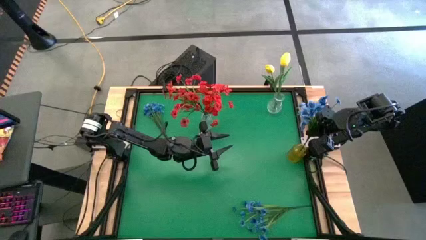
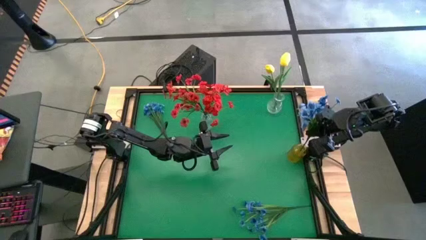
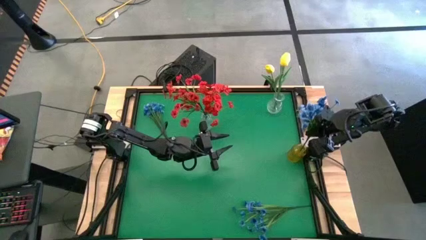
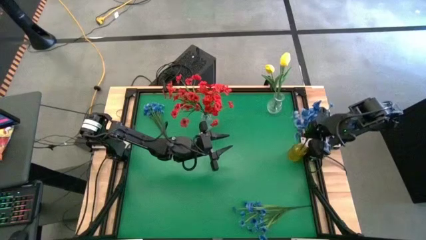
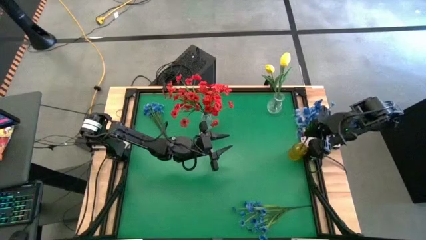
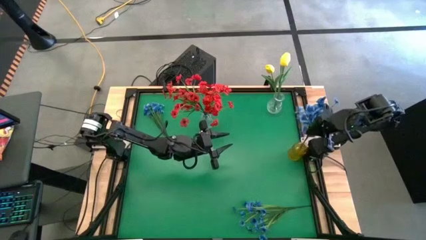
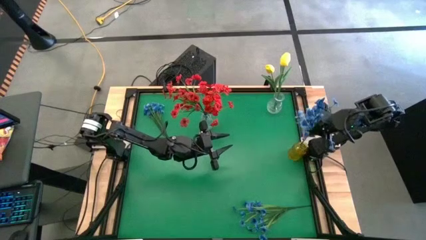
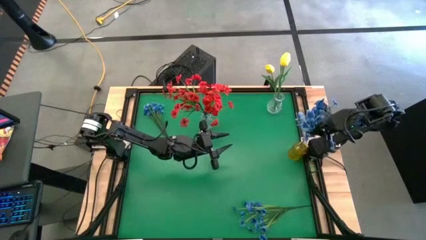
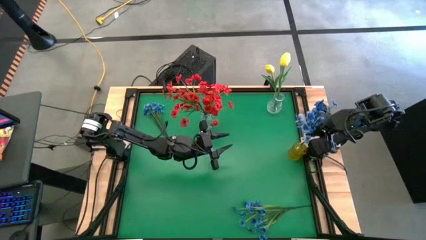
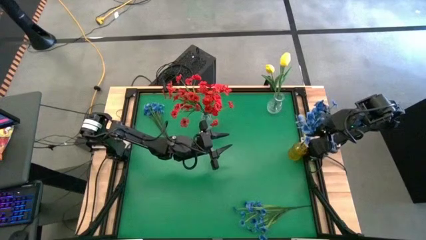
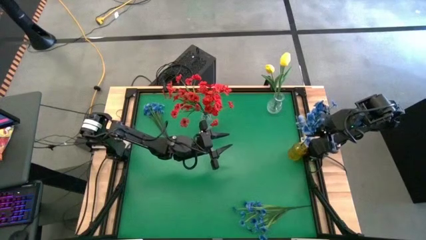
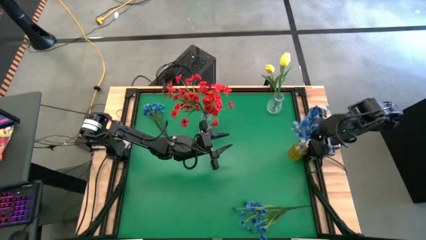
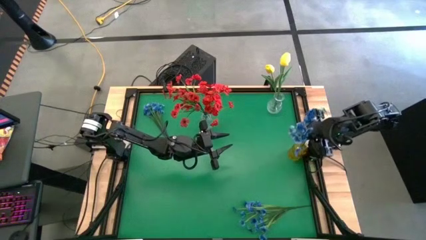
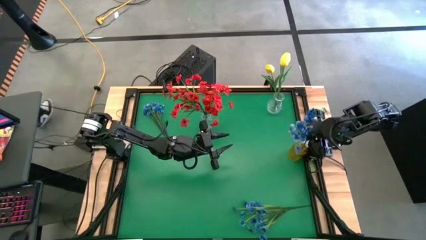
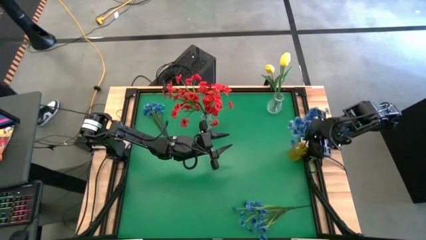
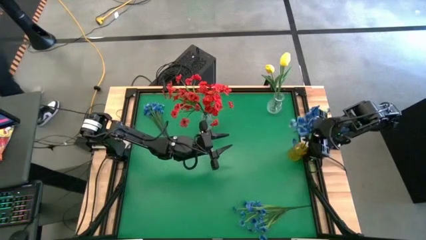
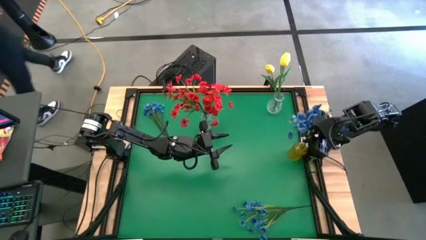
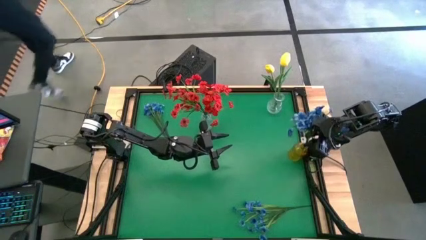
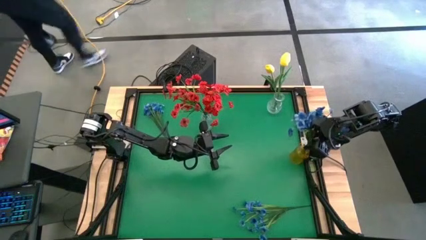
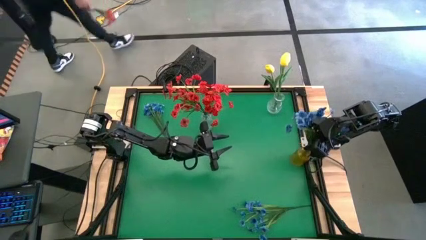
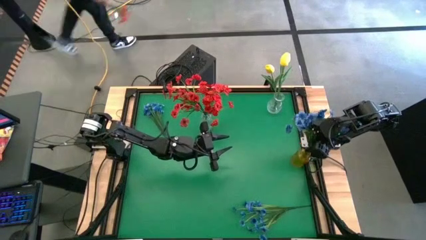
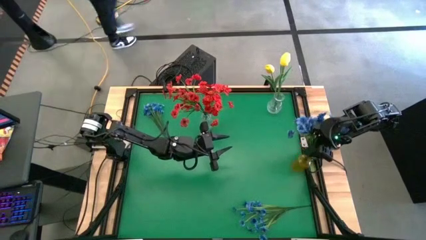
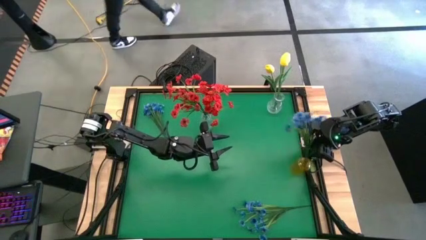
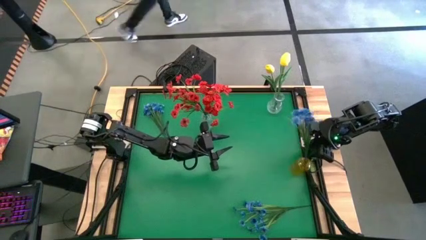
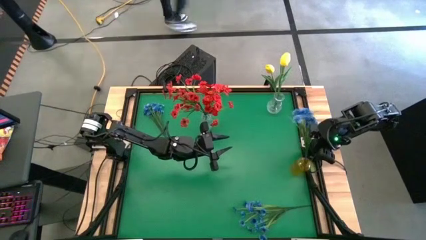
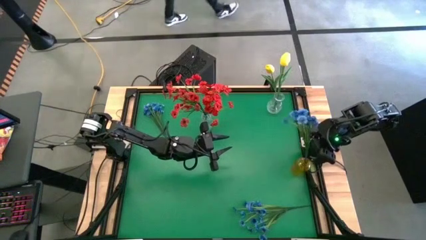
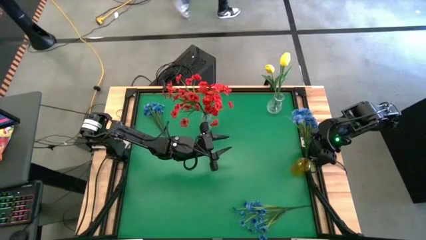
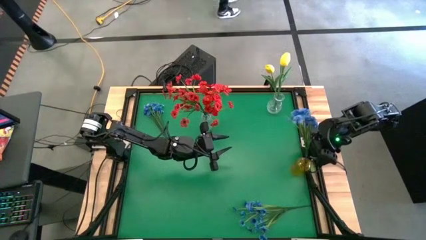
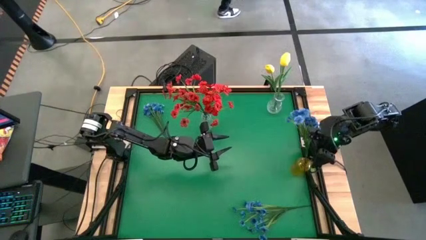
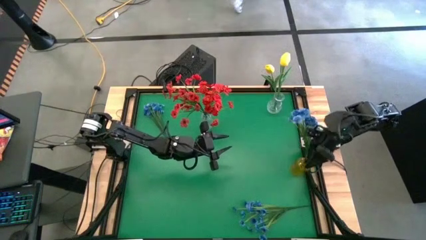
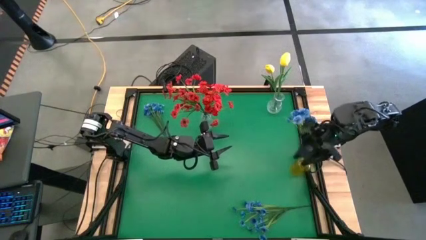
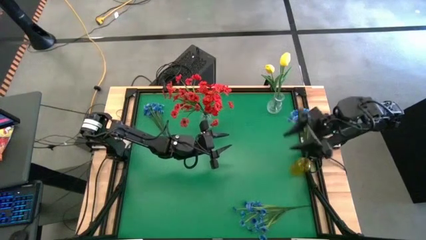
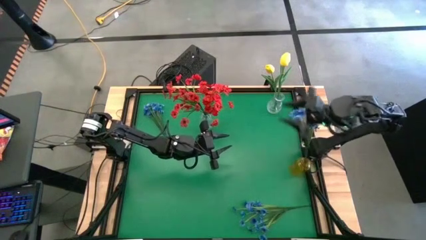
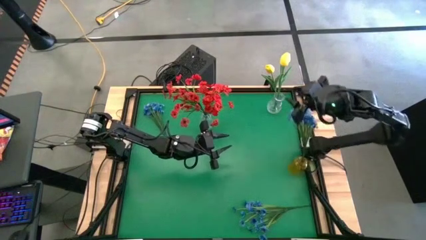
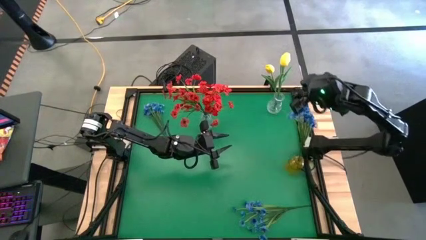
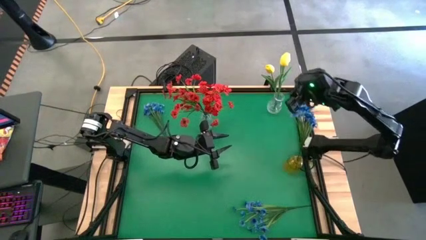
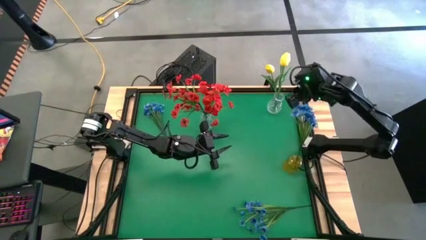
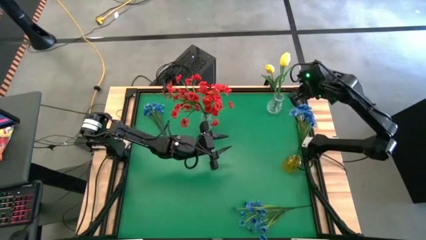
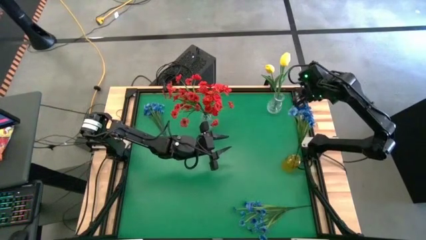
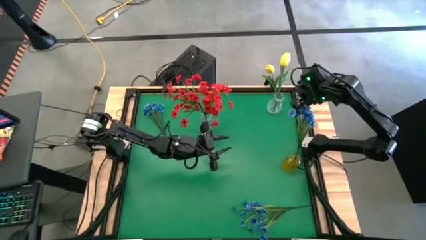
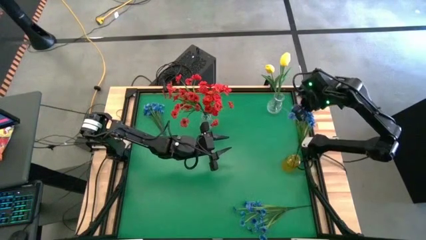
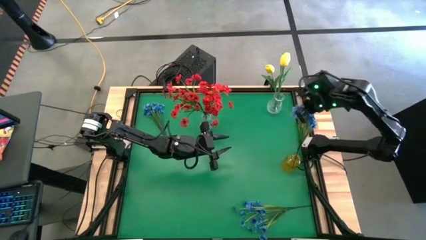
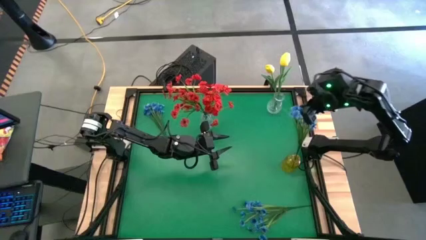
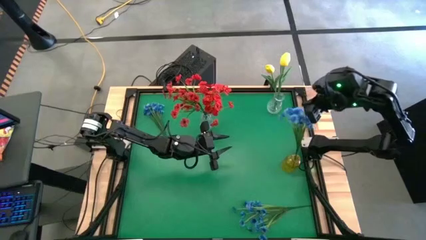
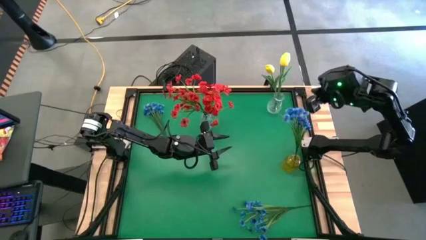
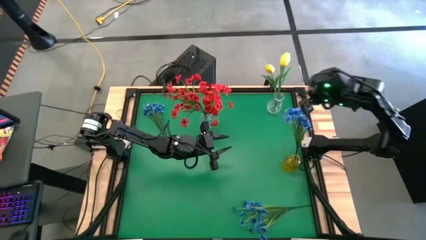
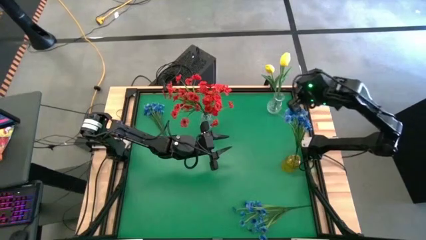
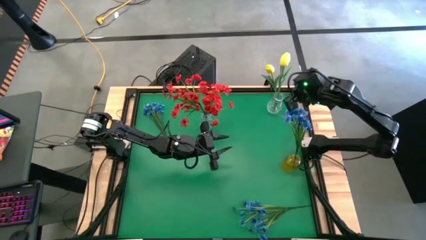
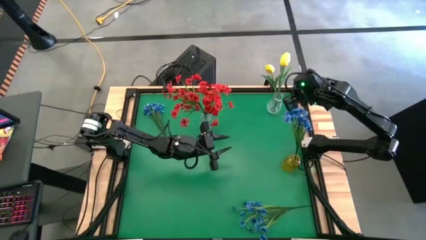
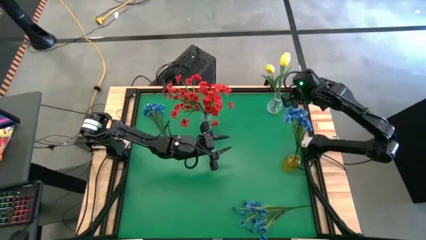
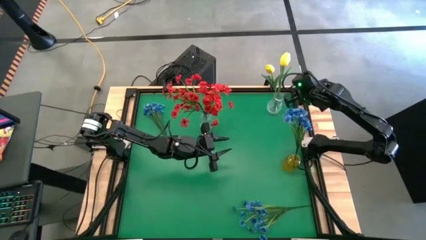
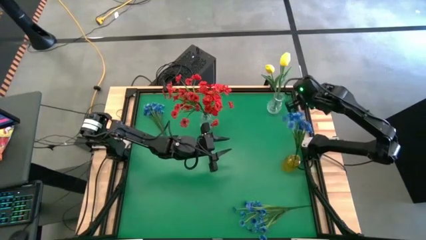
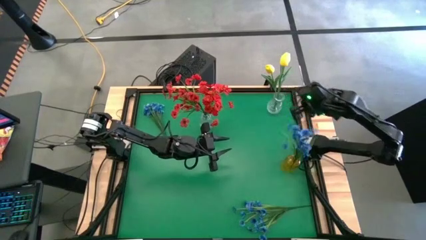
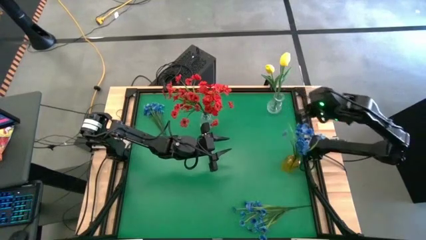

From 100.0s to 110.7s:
Task: Sort flowers into vase by color
Put the middle blue flowers into the yellow transparent vase

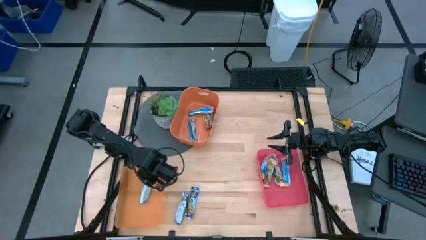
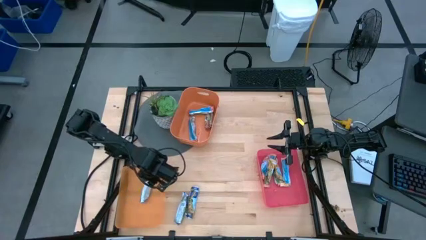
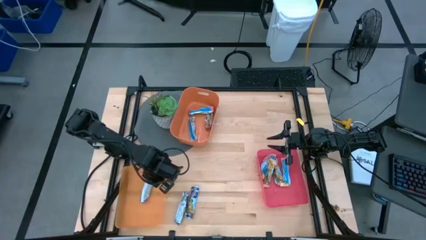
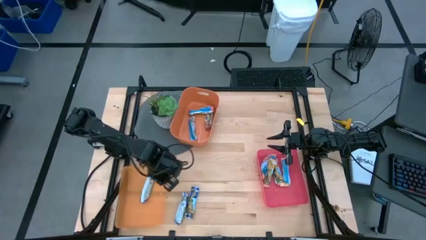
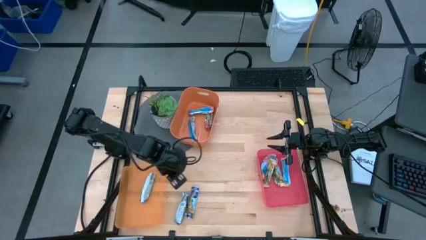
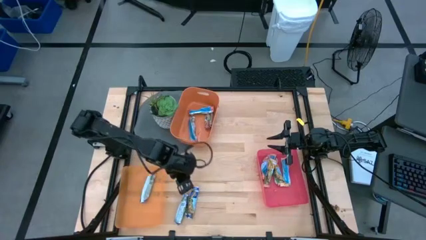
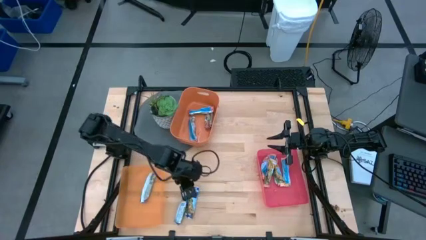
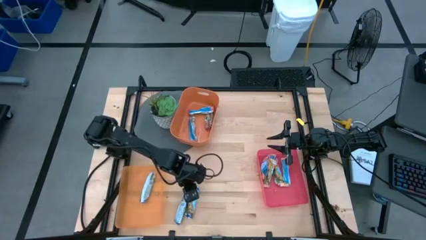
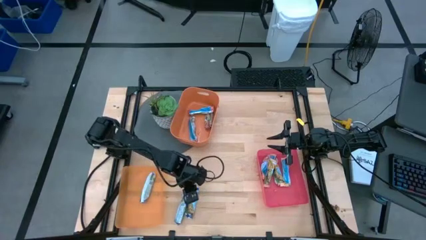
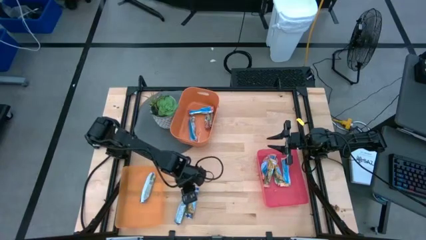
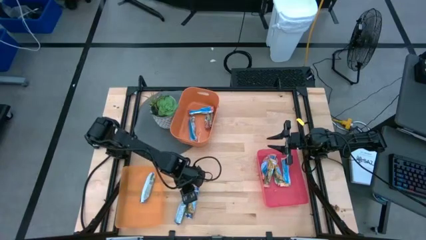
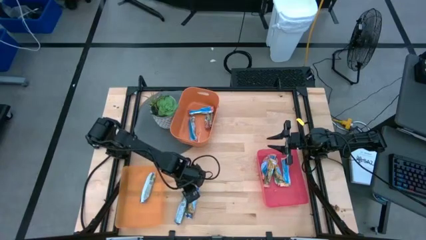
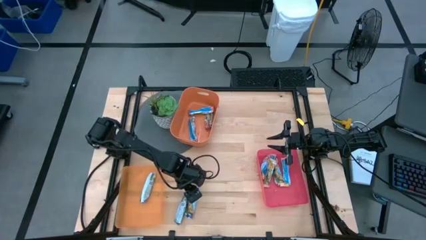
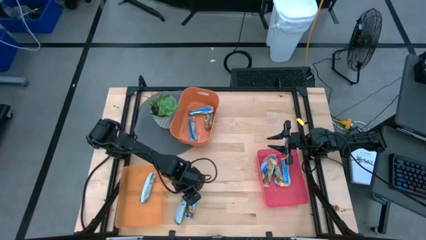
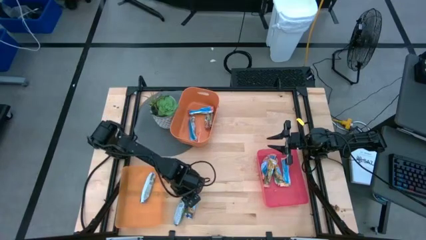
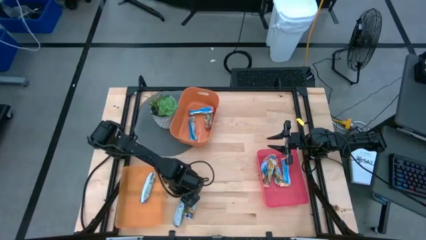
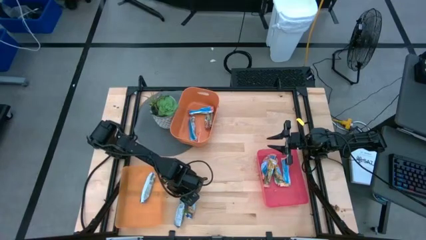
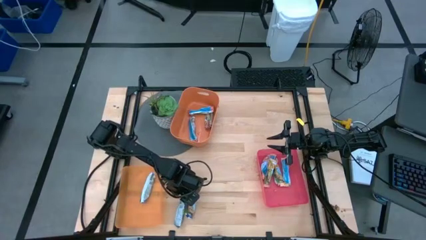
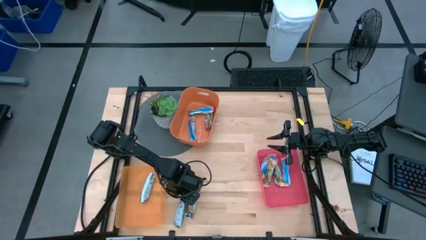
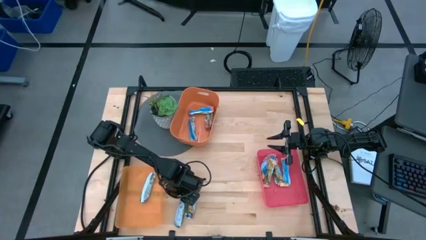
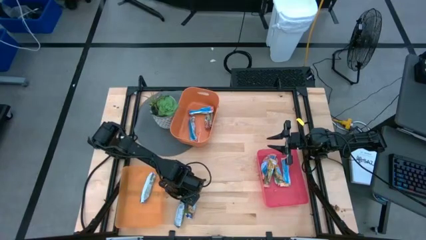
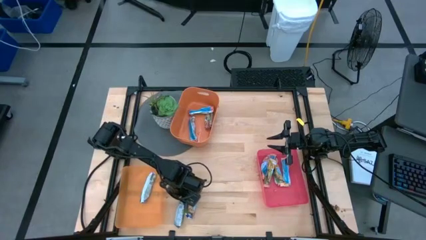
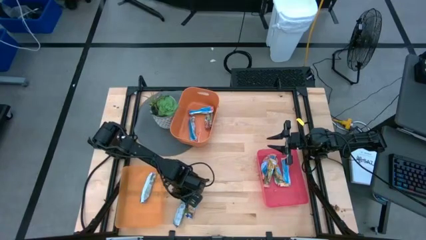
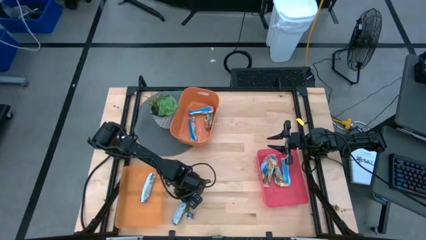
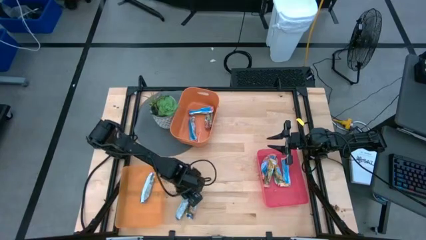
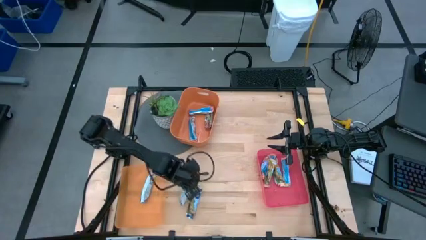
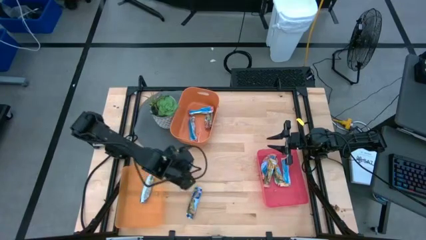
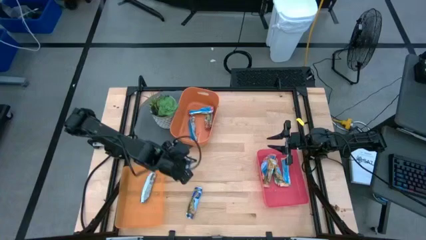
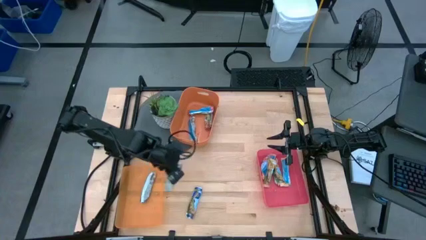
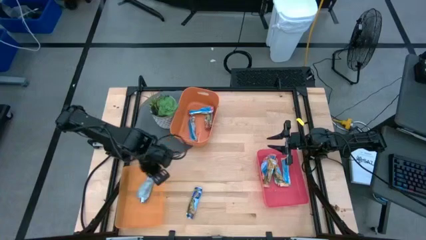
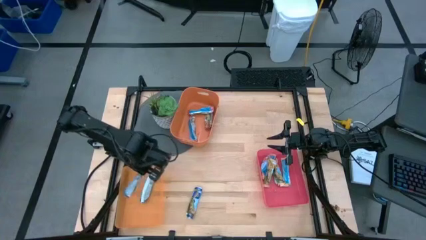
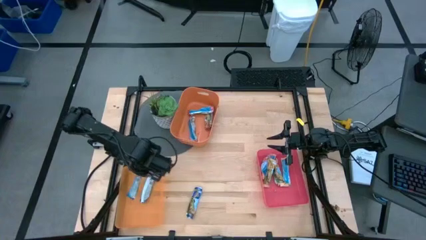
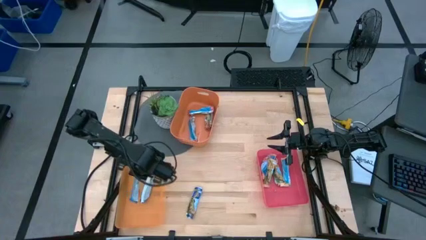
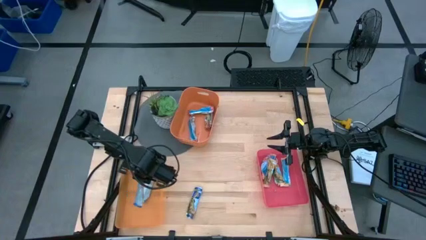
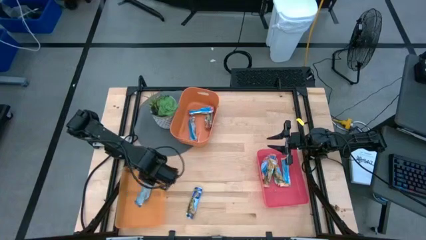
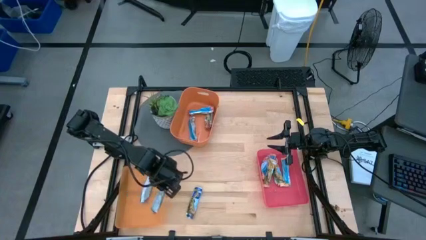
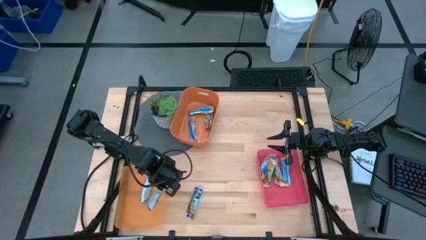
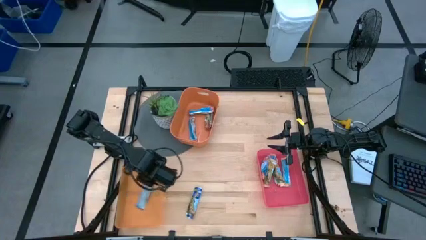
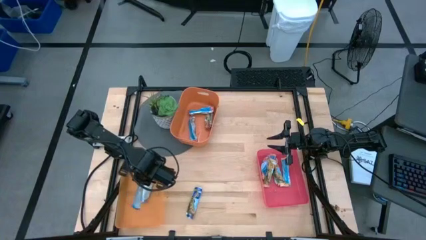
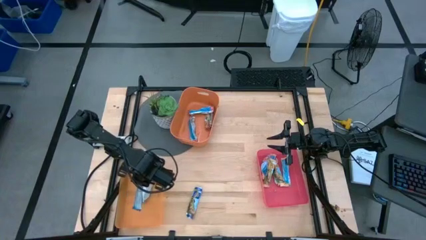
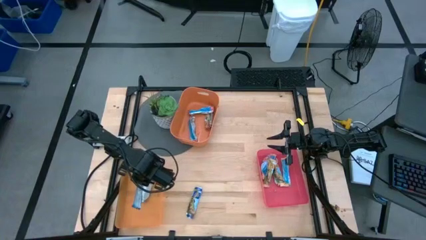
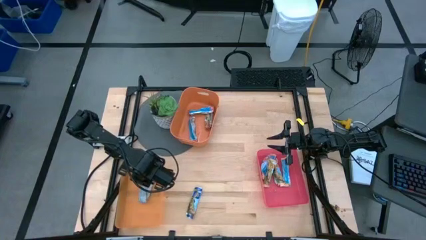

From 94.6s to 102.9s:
Task: Pick and place Granola Bars by type
Put the blue granola bar into the light orange bin
